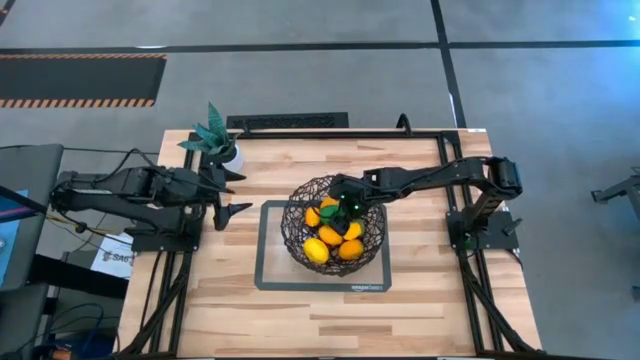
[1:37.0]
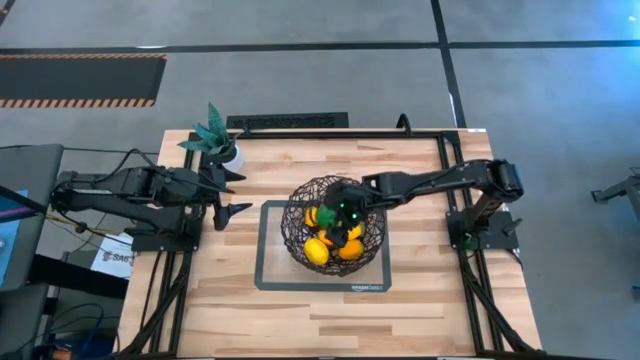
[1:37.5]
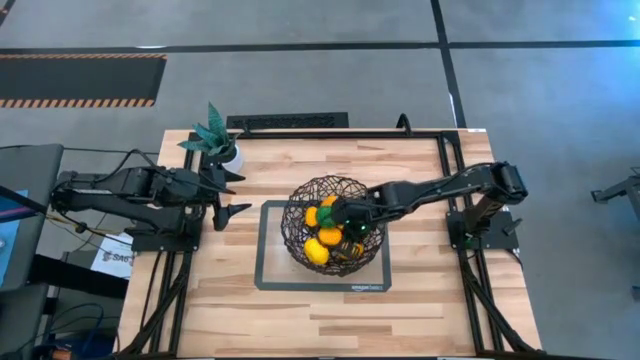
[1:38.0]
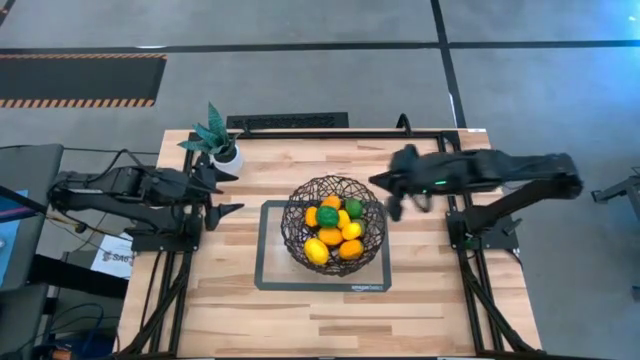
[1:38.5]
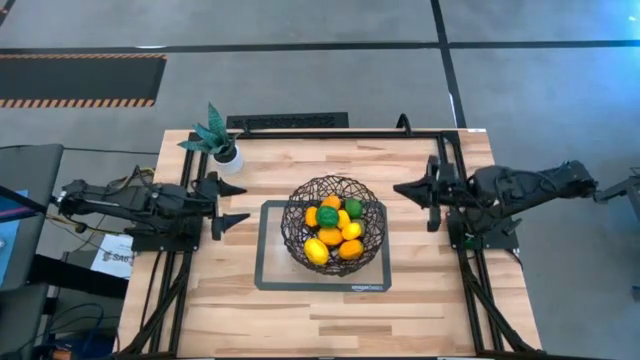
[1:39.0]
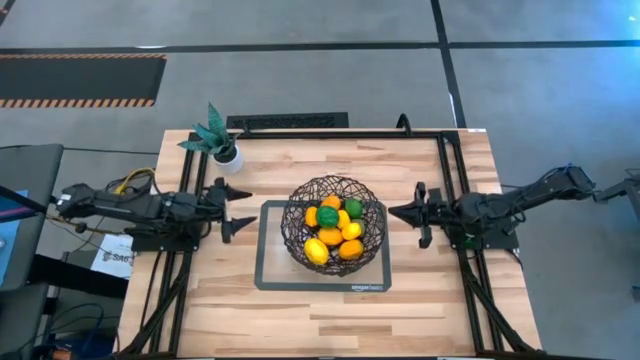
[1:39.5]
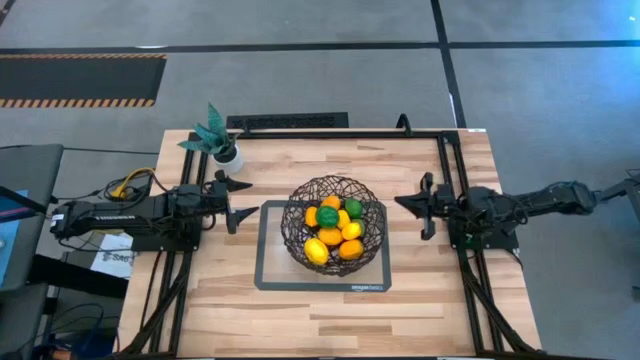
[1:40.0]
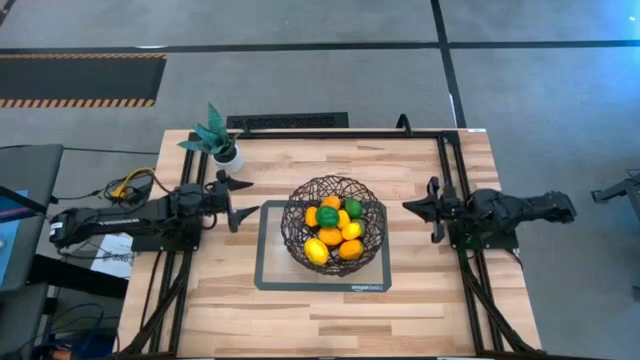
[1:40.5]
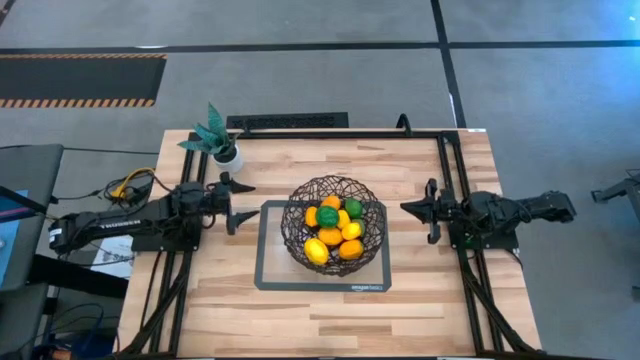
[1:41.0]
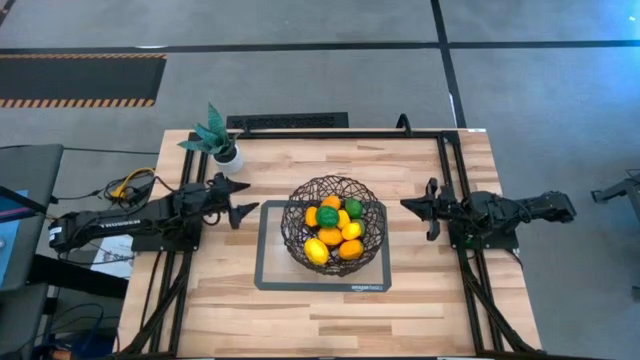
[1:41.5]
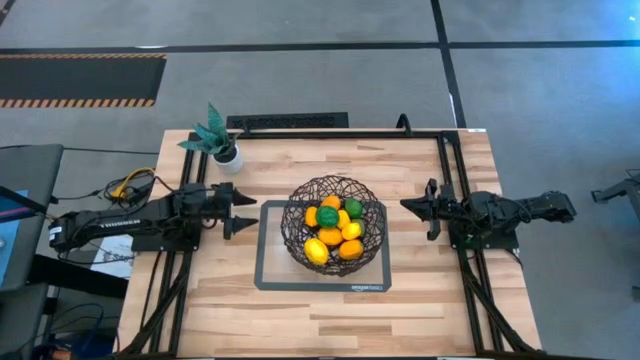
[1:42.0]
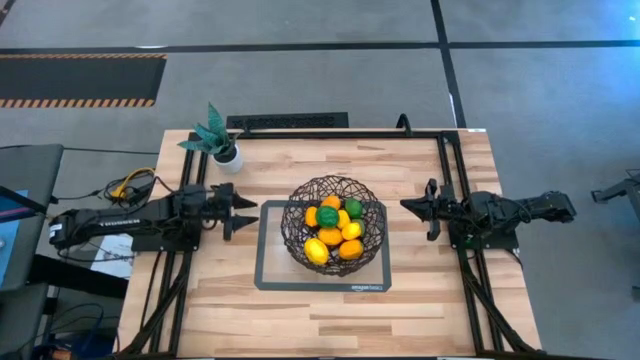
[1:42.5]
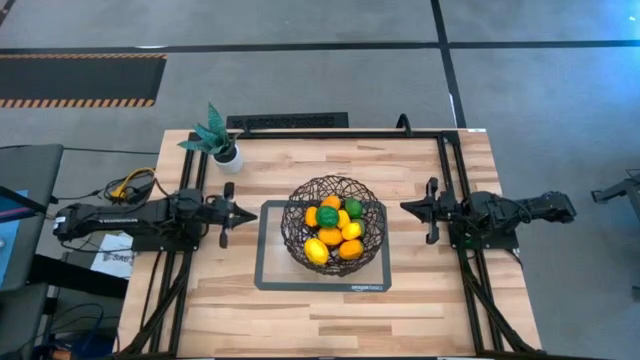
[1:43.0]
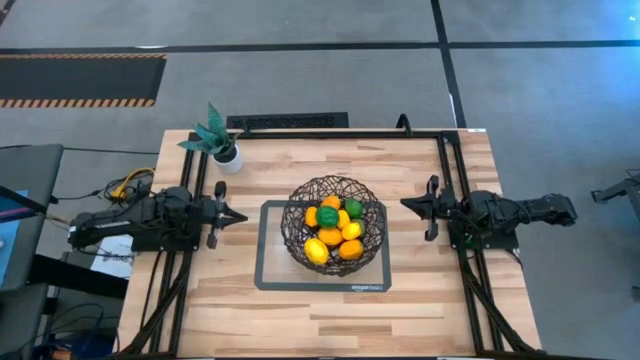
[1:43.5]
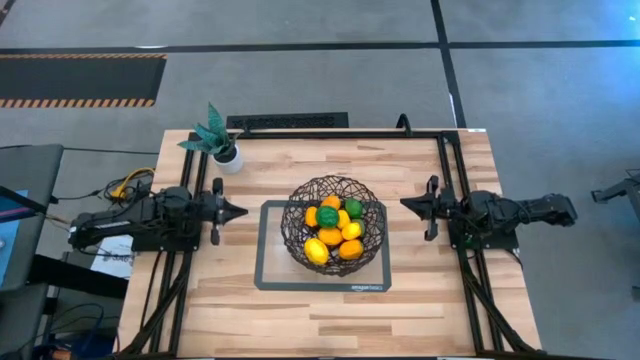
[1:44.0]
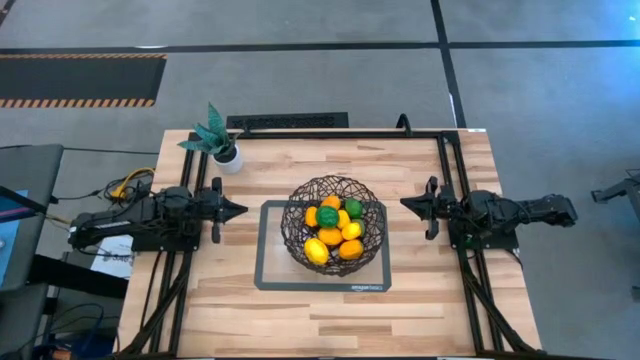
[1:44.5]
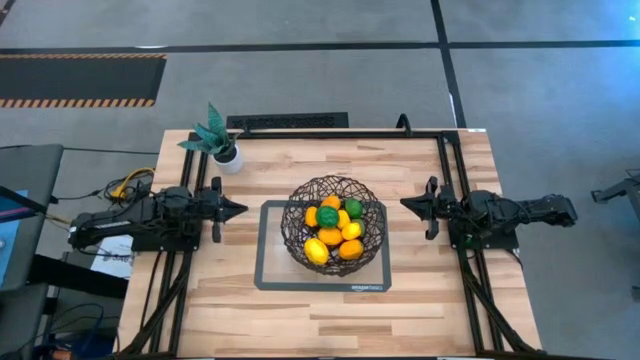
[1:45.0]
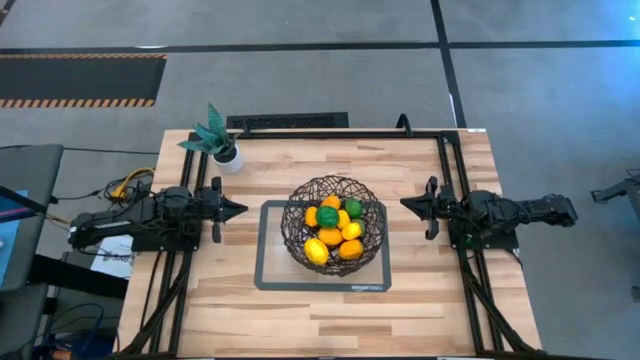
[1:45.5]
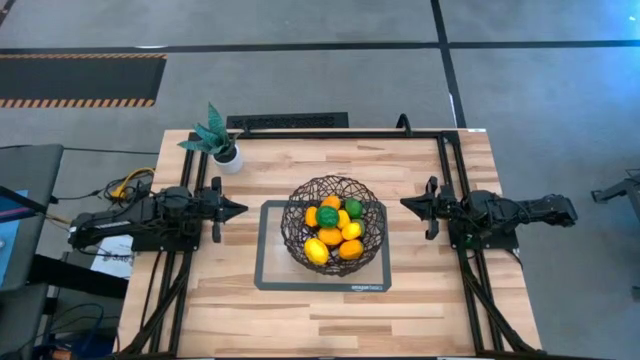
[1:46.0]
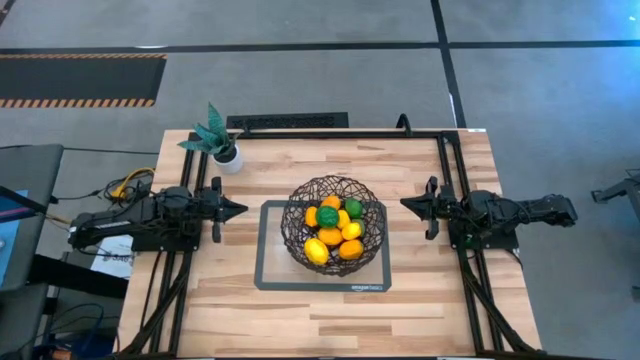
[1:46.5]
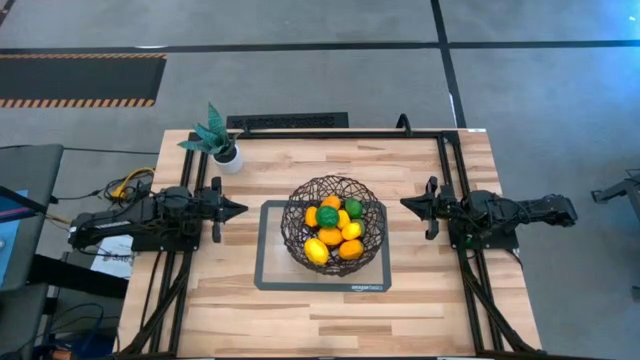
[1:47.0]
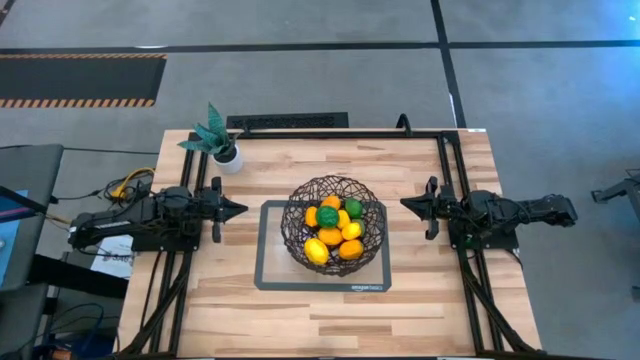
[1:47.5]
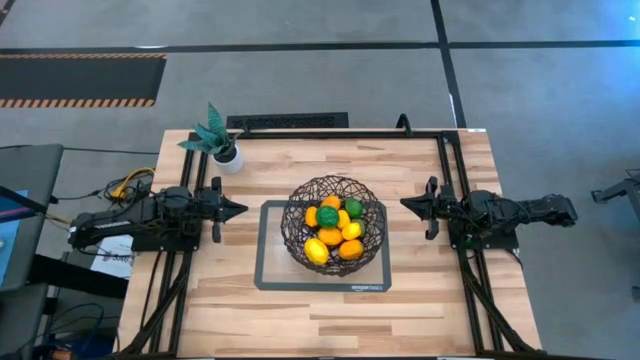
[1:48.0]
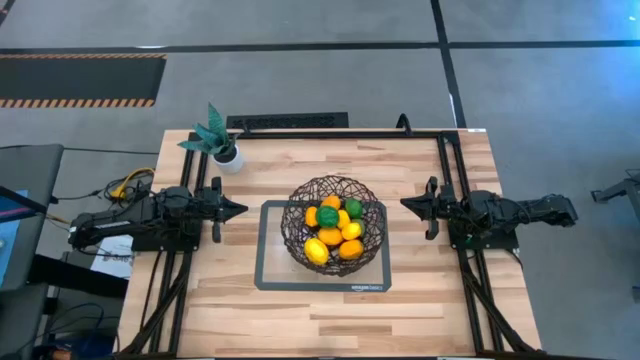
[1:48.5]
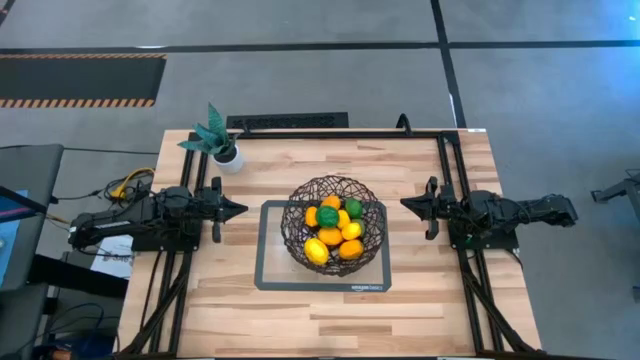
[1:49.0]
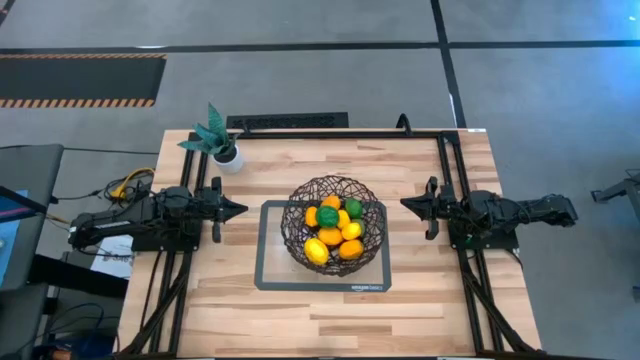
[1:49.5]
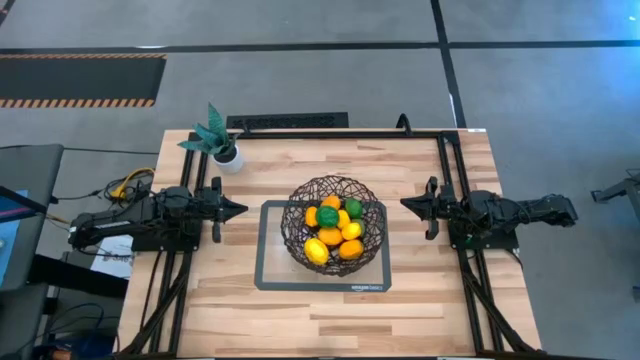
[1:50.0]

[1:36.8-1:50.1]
Task: Build produce basket
Return to Home Position

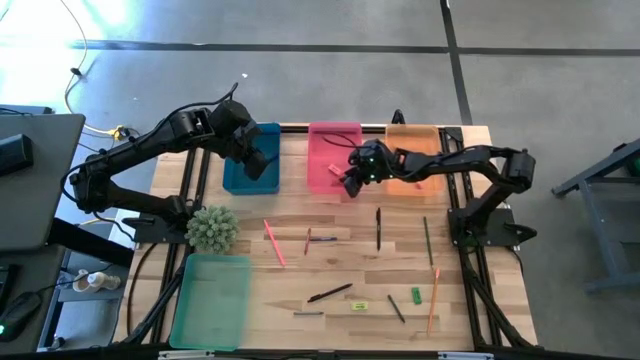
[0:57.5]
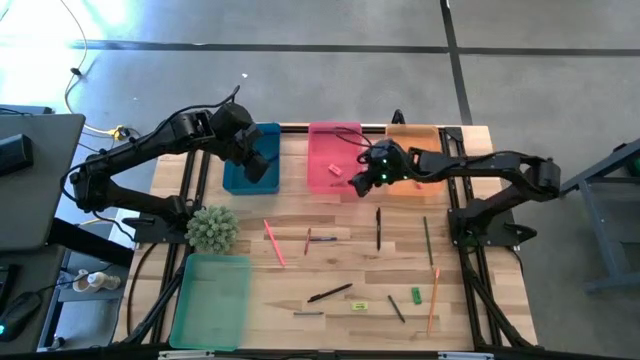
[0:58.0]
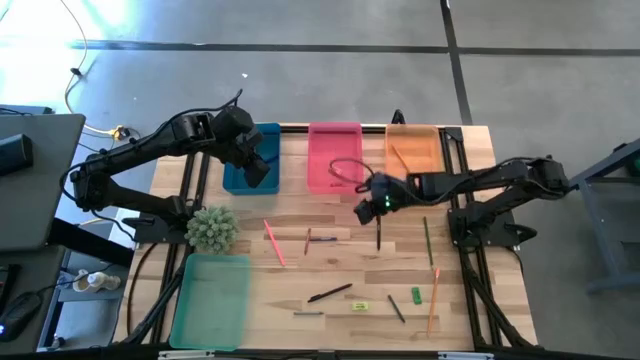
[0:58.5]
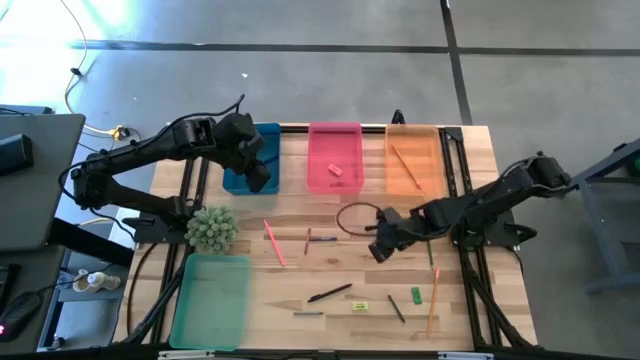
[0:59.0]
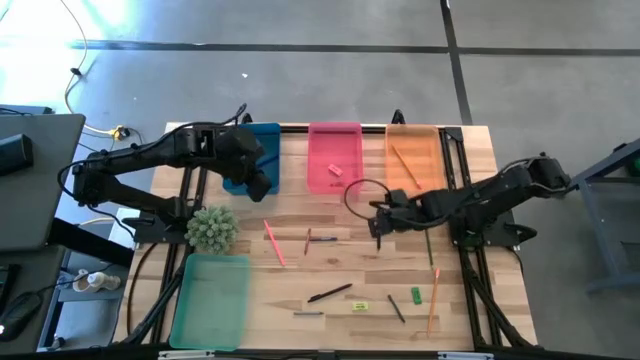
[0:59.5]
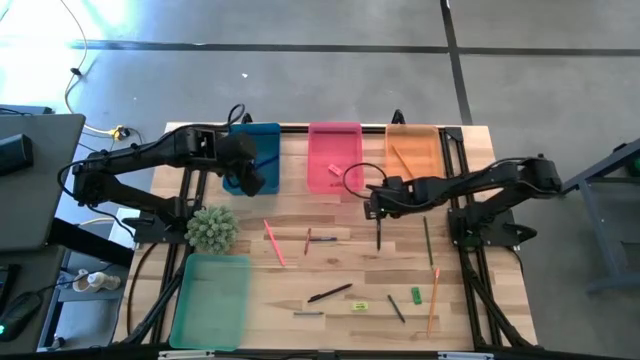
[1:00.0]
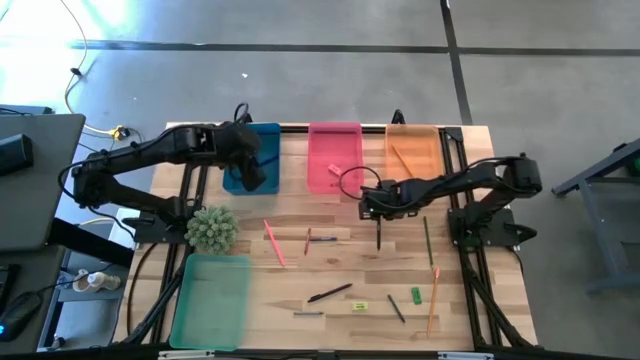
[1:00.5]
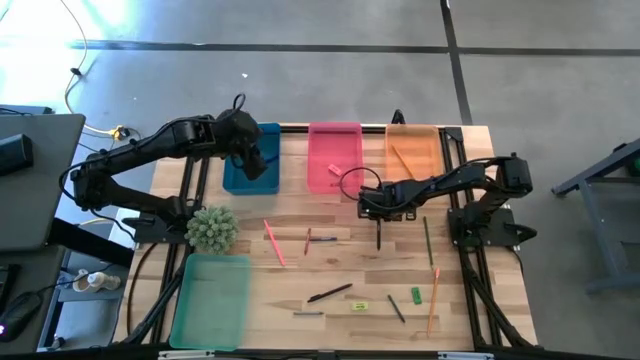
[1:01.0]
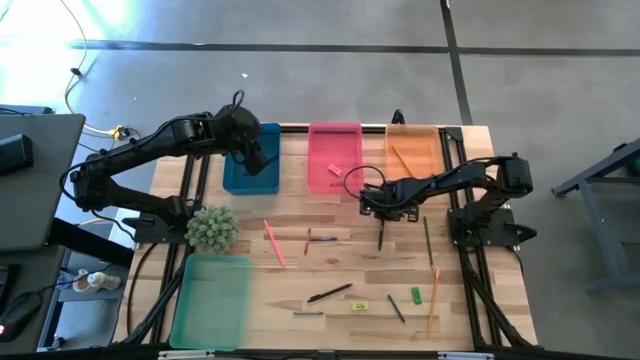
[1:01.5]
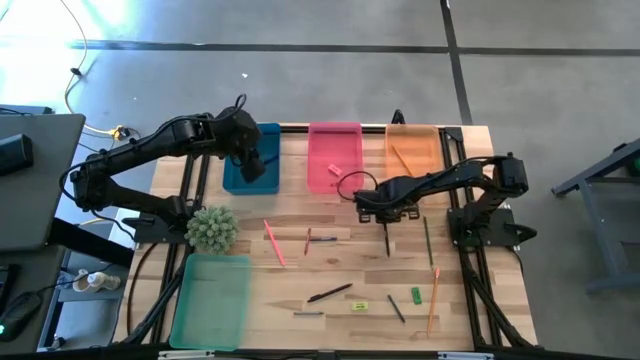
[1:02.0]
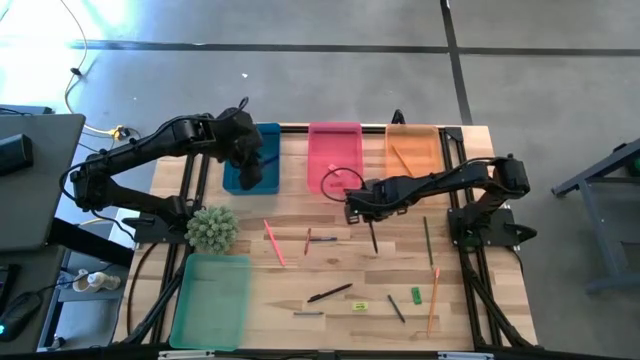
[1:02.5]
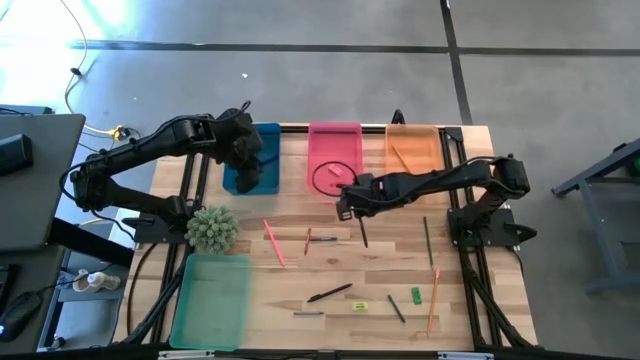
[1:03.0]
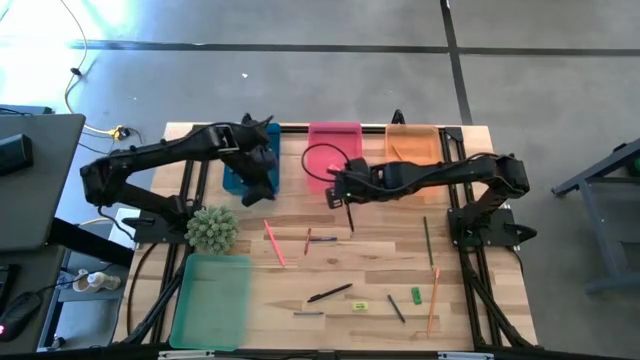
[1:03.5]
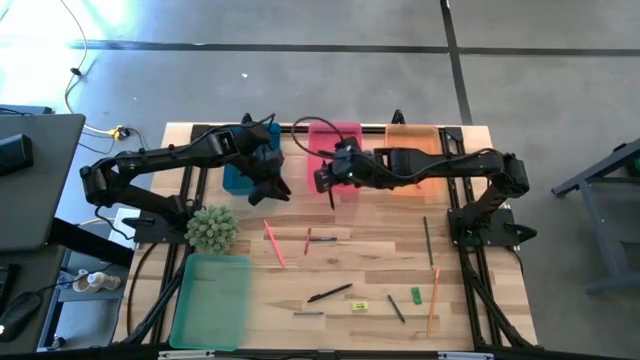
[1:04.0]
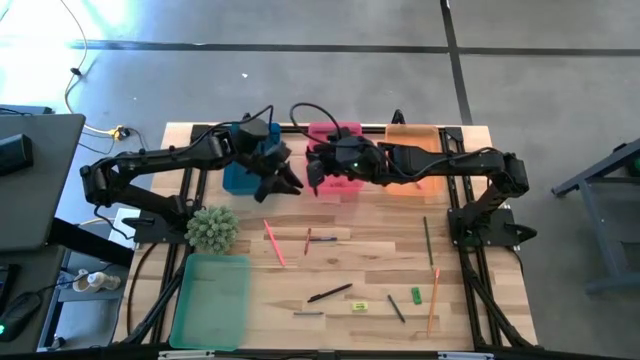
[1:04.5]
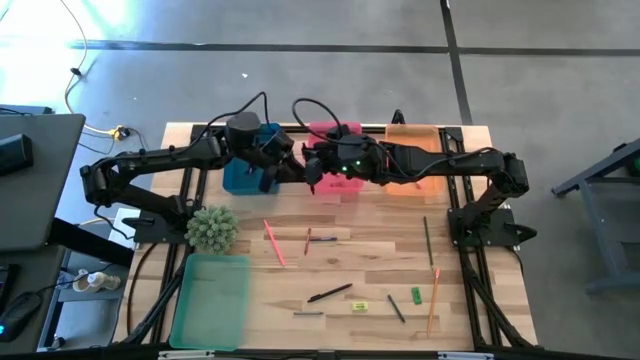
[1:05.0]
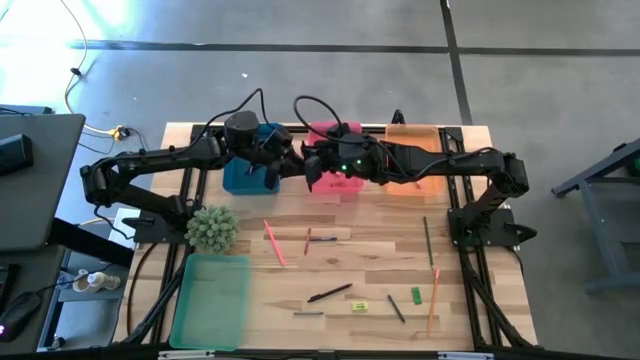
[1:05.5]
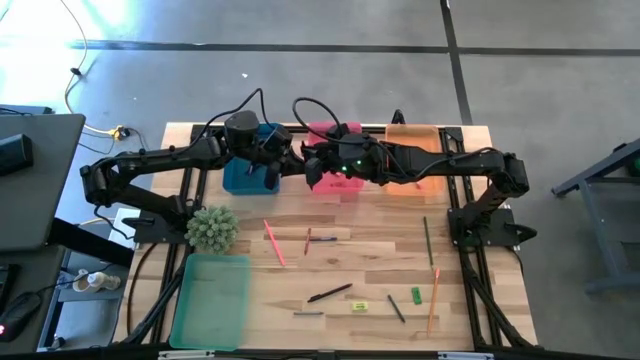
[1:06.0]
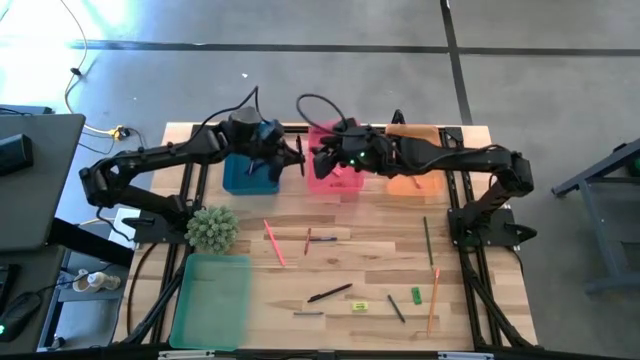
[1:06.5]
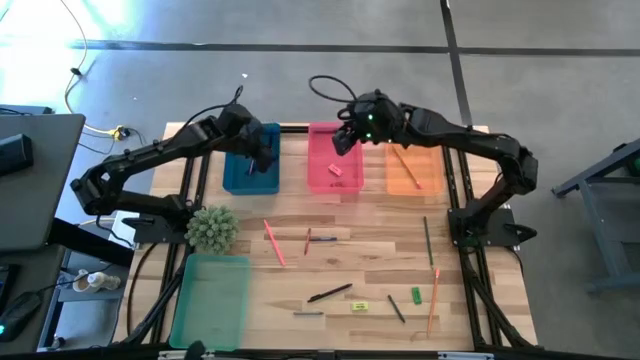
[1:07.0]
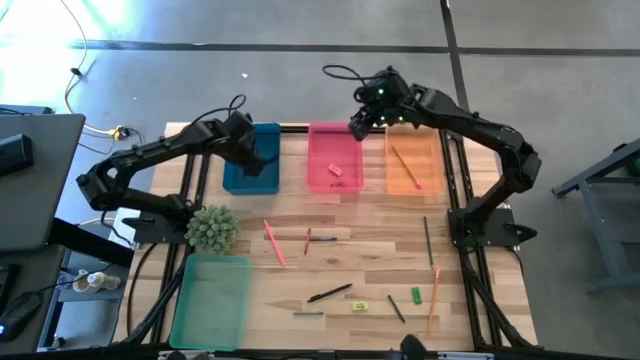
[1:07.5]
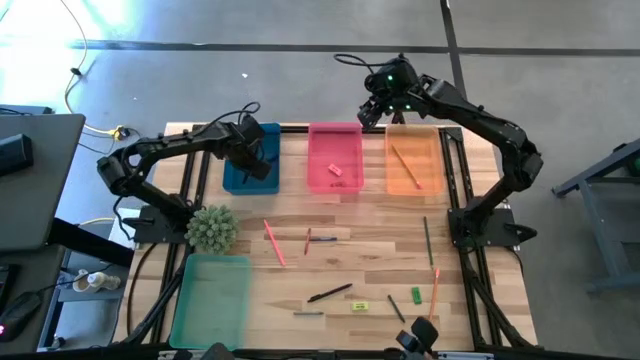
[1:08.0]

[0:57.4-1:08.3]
Task: Sort crayons/erasers/pens/pencils in bins
Put the top black pen into the blue bin
